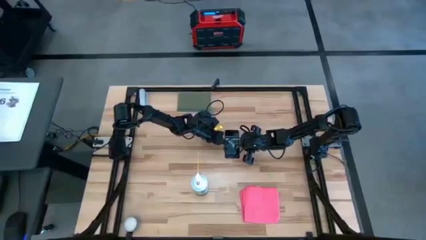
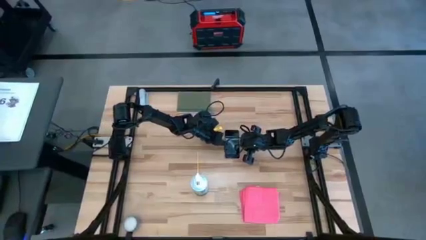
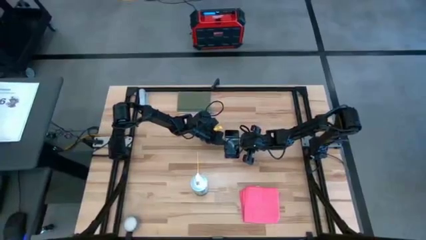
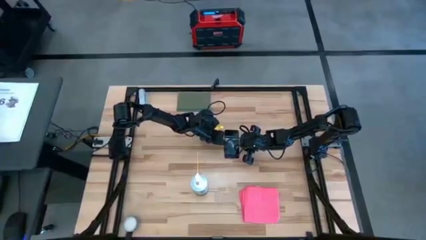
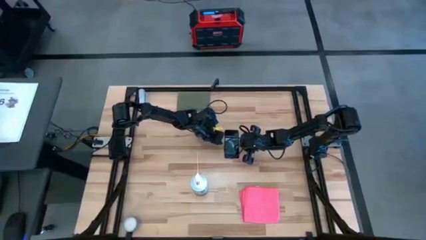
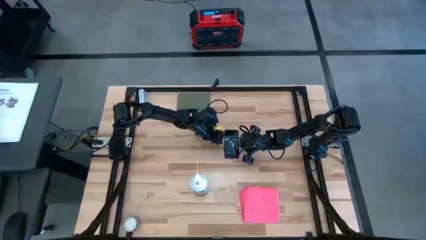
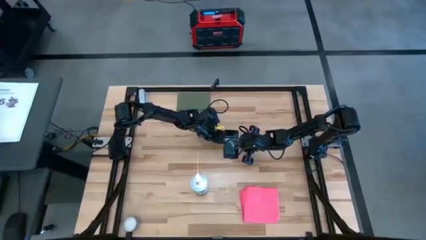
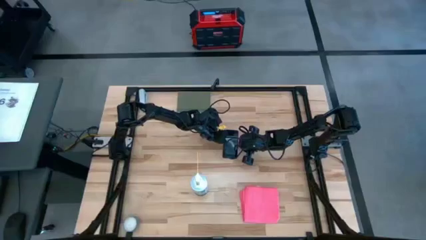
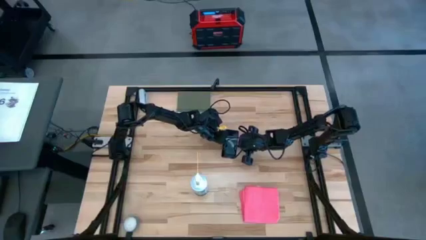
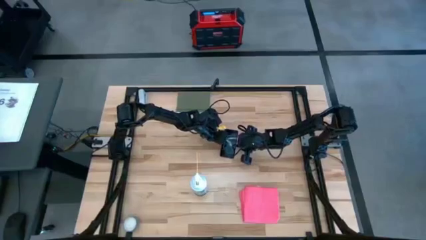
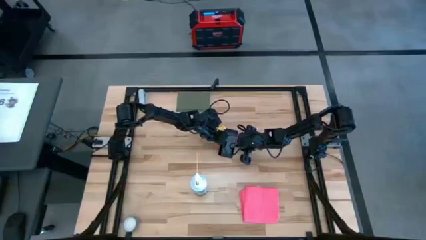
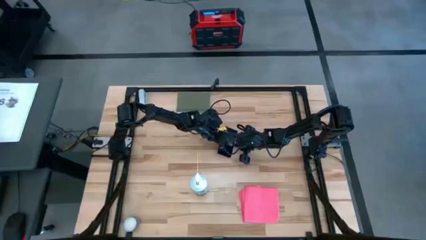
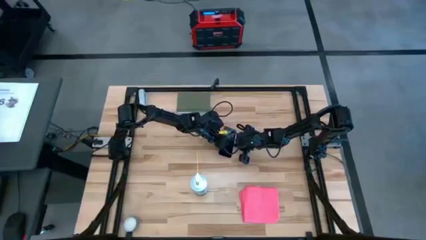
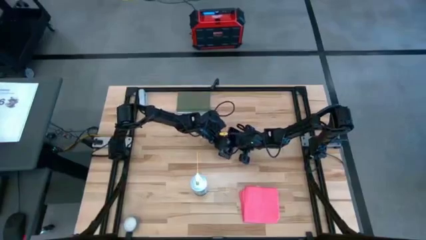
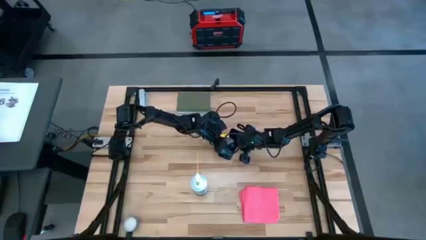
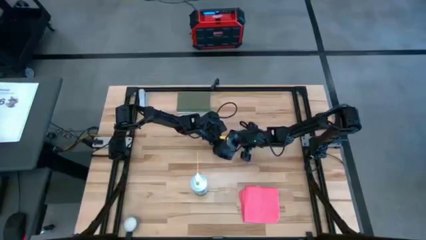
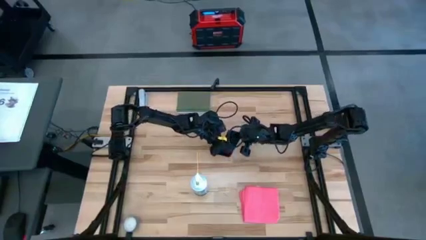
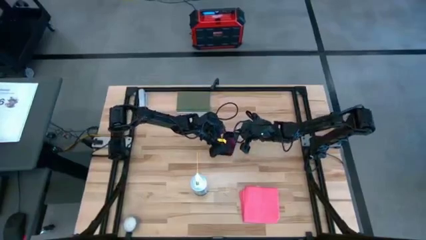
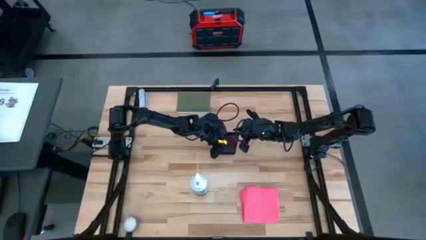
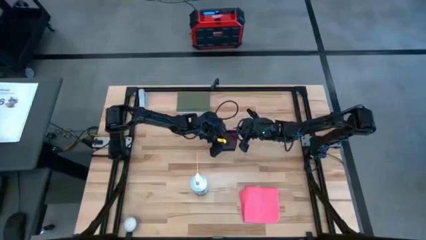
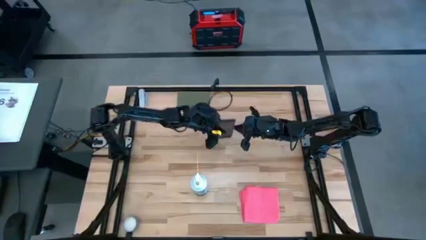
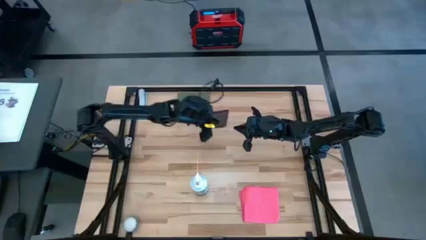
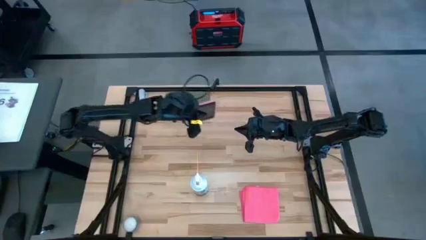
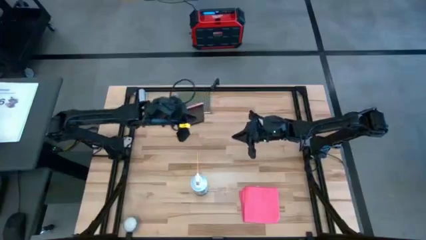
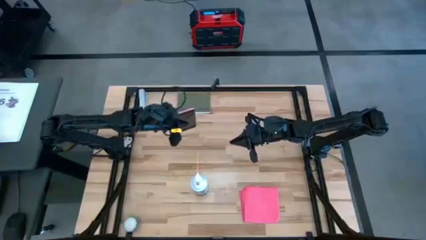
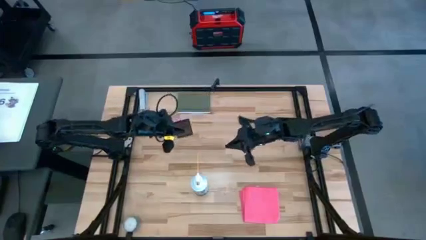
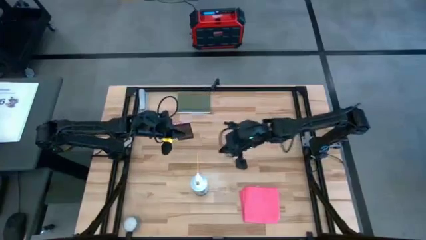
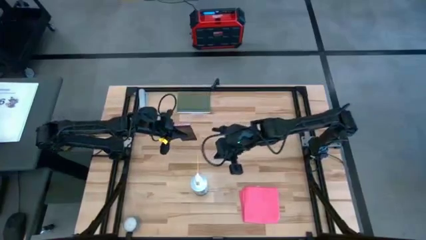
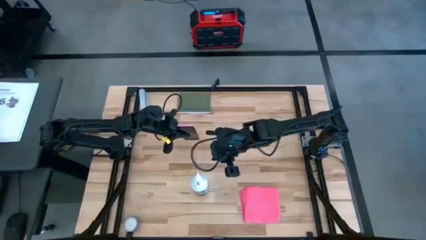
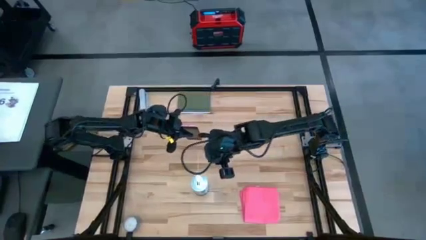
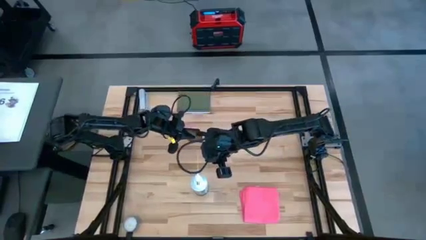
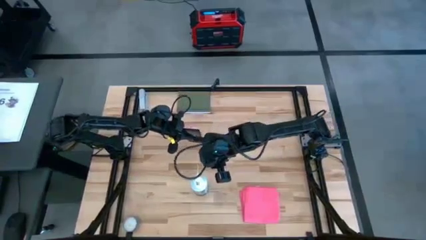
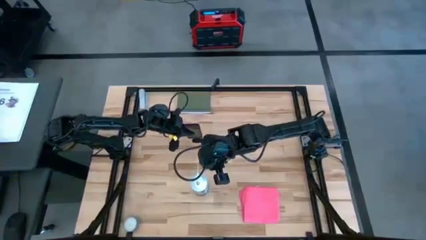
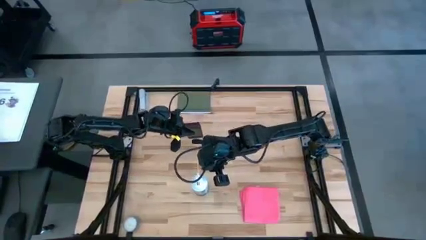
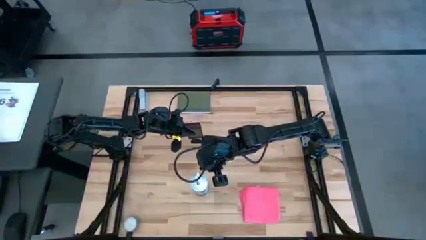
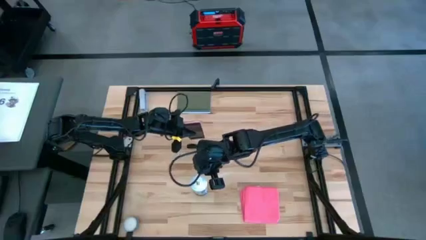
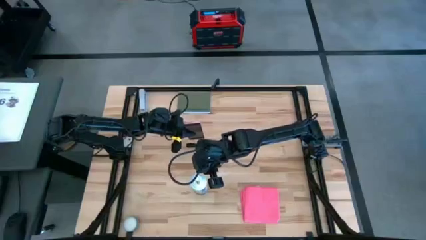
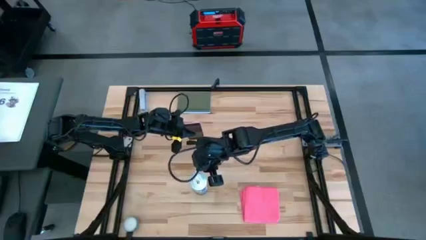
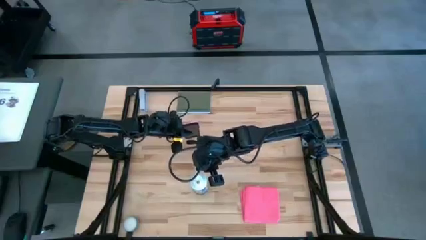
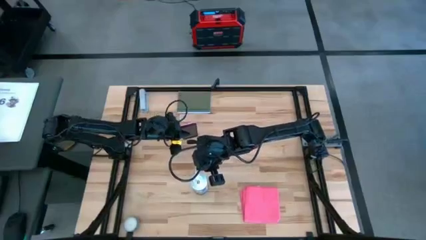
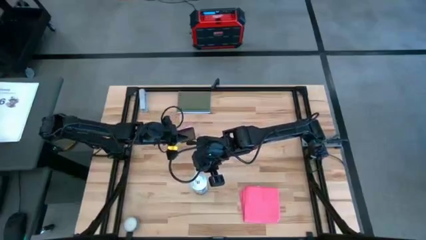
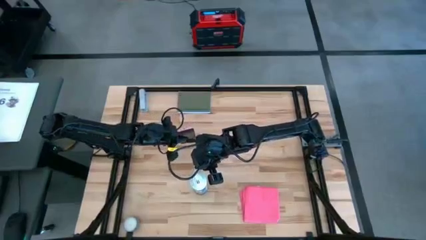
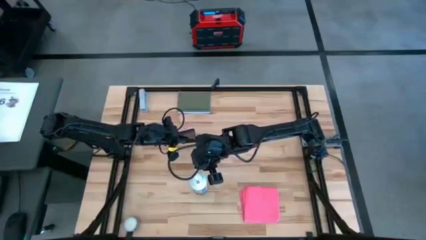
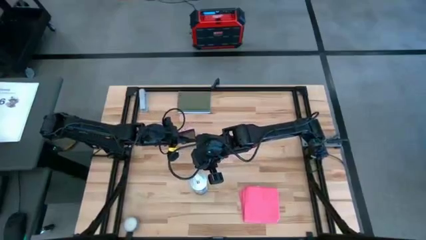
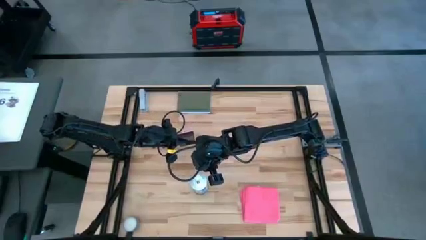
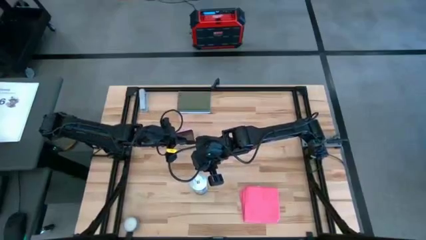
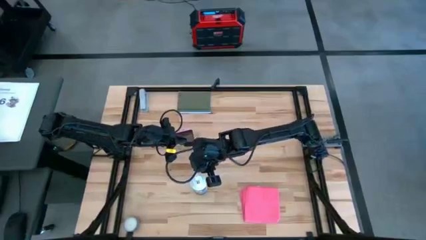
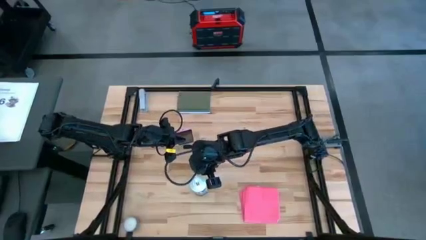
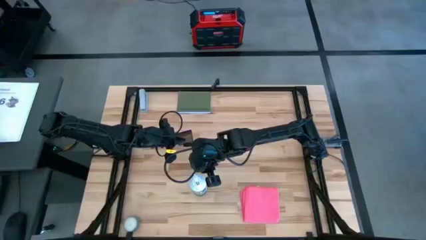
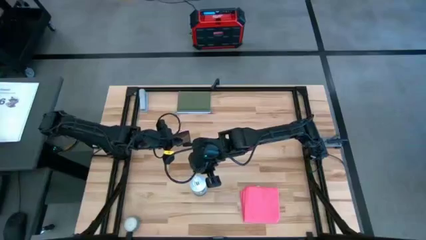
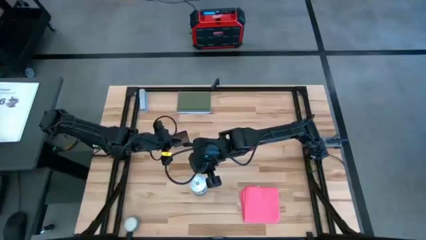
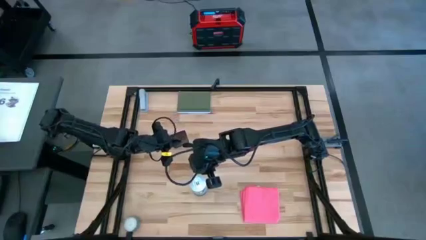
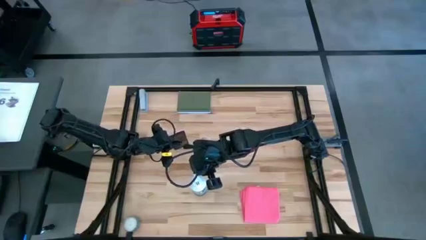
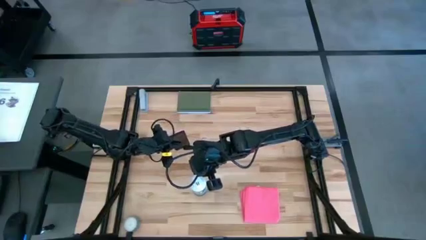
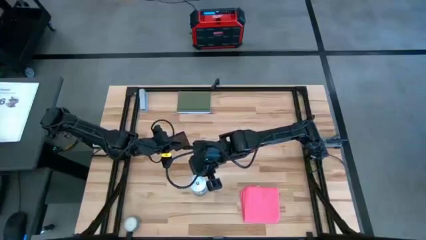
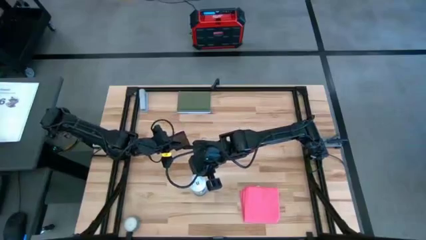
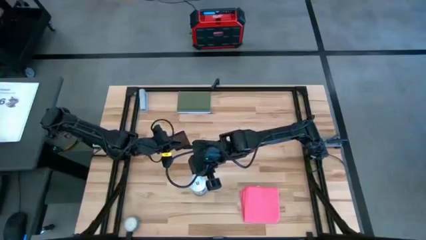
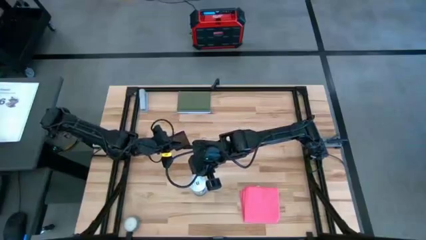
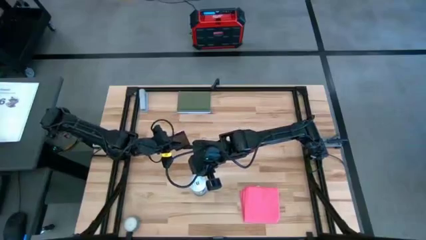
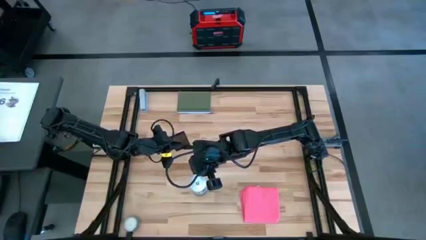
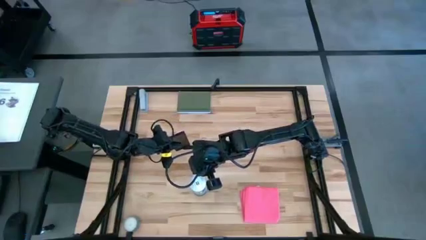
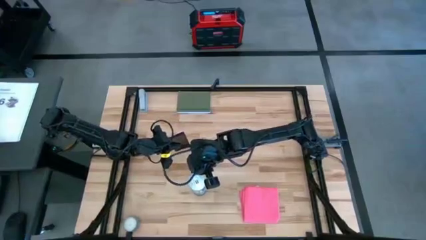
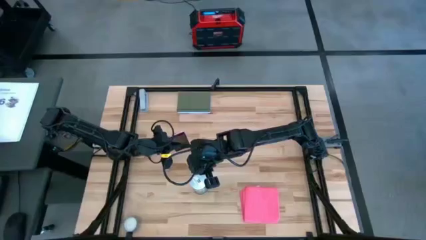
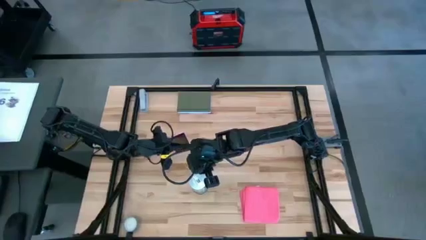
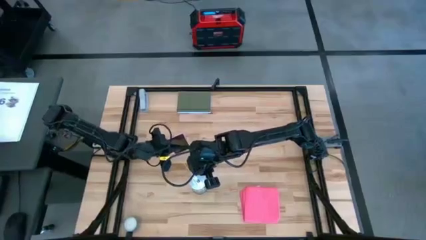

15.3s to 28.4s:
Task: Apply microfiber cloth
Spray the front of the pink cellphone with the white spray bottle

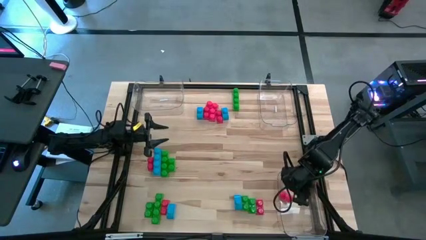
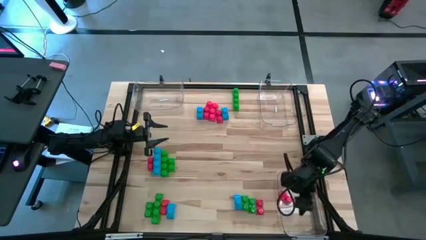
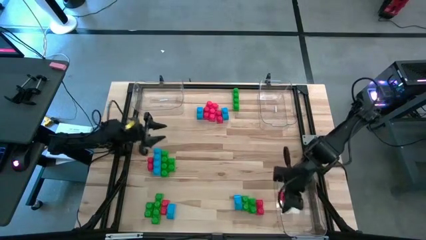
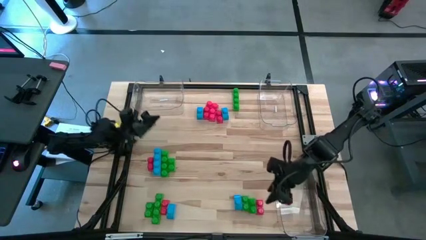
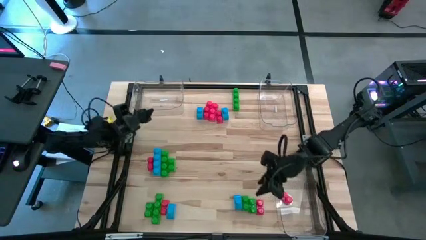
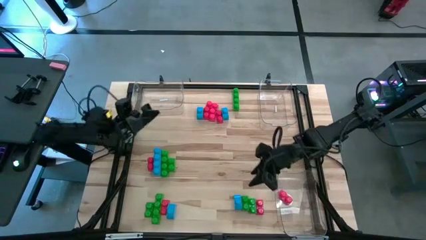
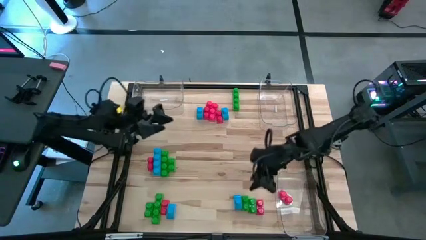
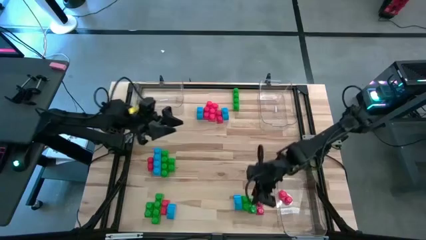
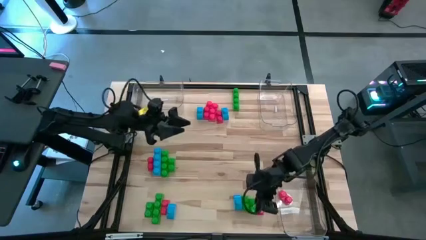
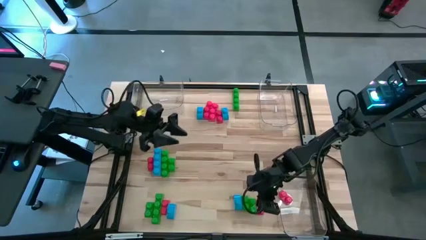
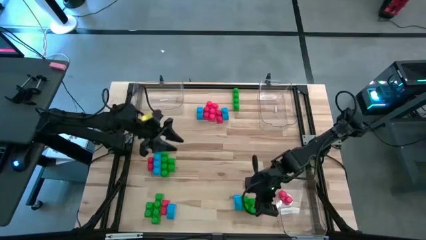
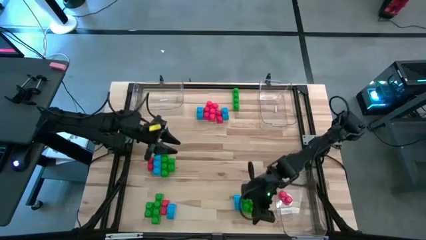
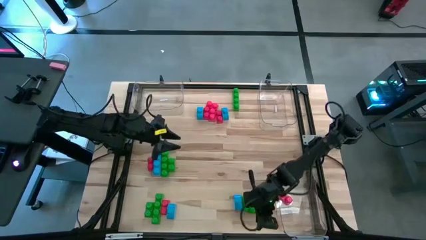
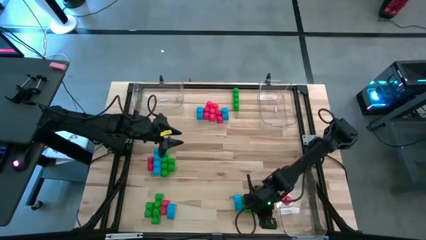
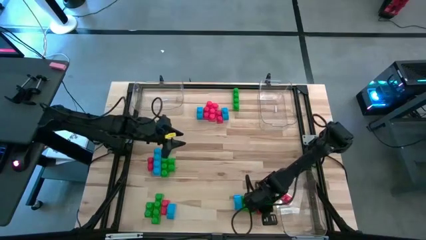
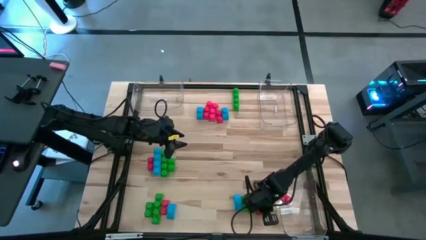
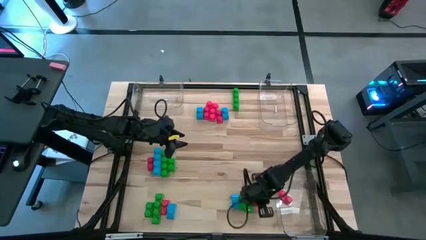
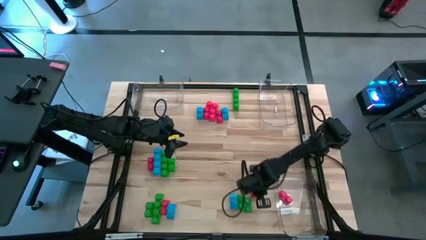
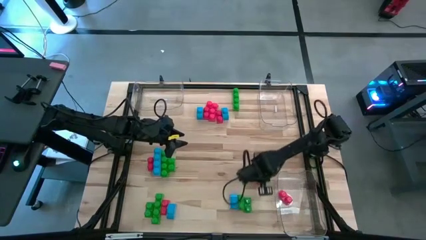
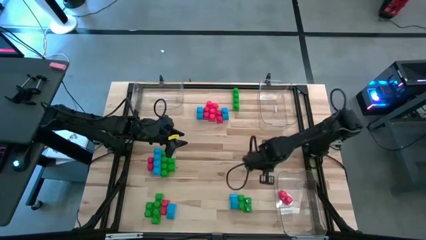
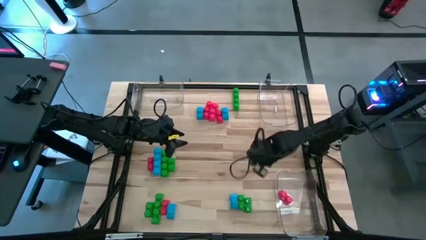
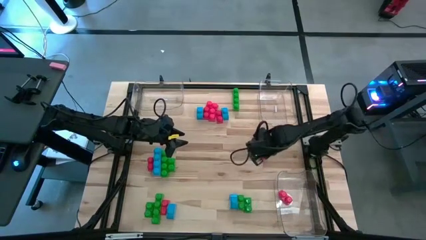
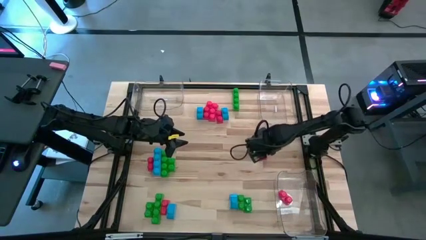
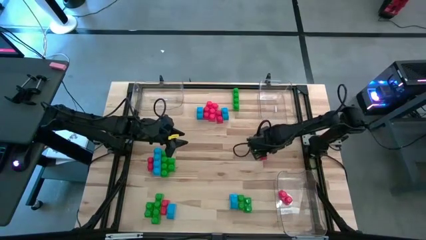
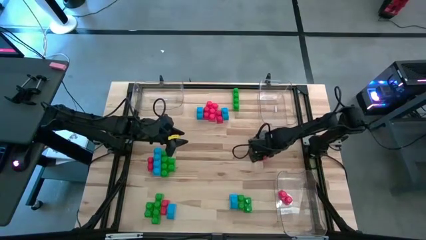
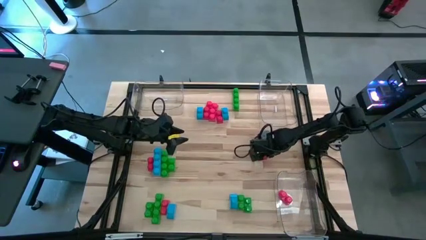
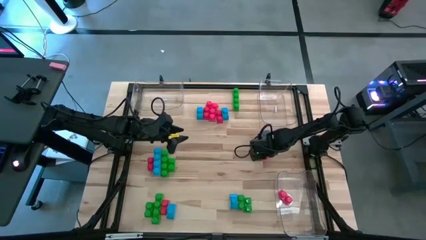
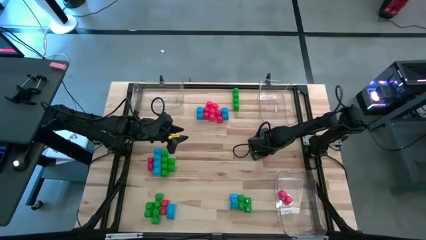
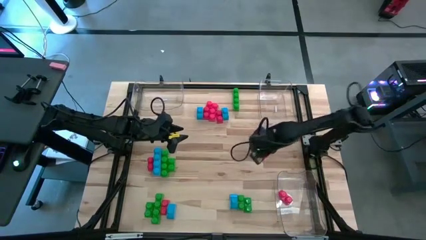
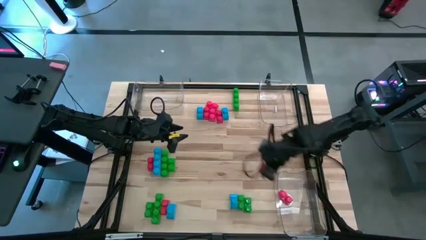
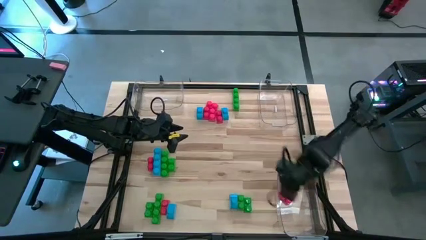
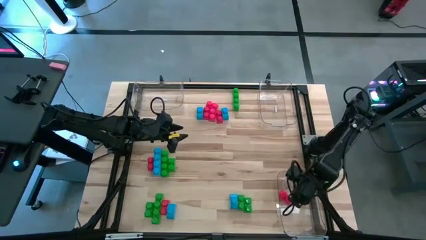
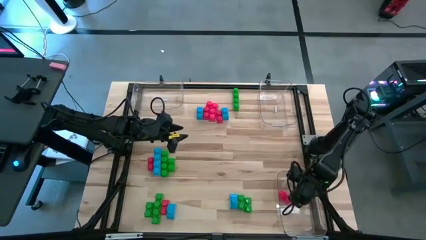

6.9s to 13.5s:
Task: Sort blocks
Put the red game piece into the bottom right transparent bin
